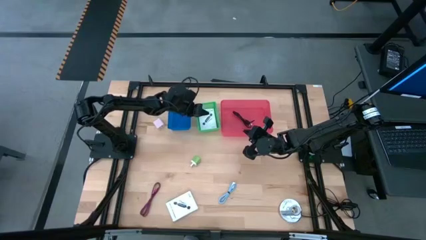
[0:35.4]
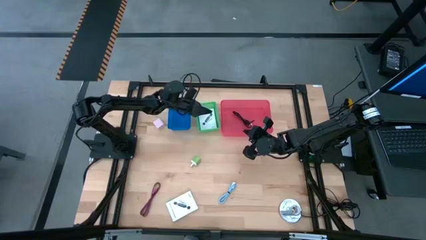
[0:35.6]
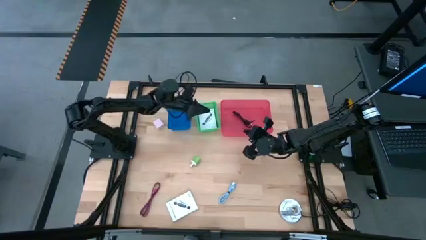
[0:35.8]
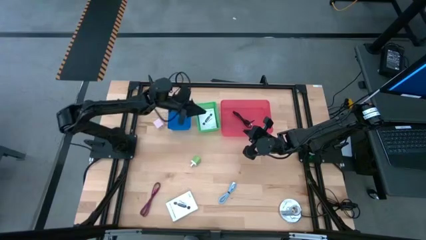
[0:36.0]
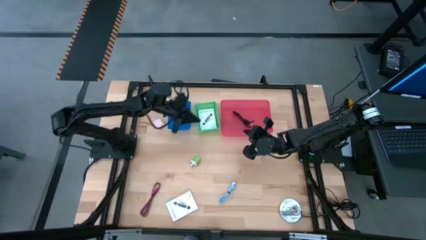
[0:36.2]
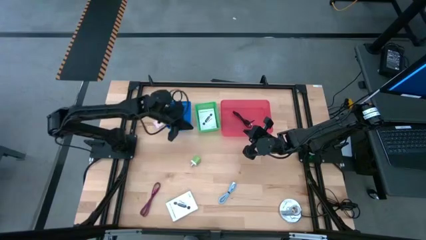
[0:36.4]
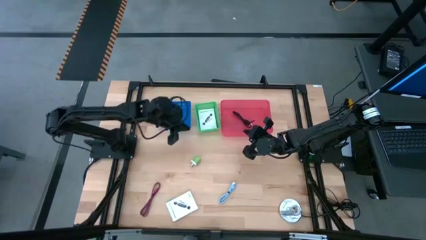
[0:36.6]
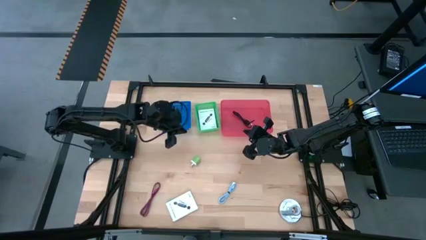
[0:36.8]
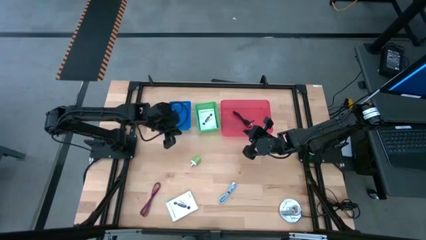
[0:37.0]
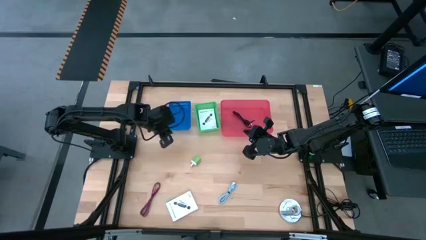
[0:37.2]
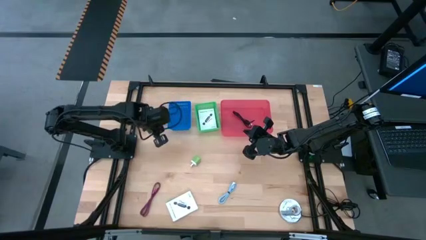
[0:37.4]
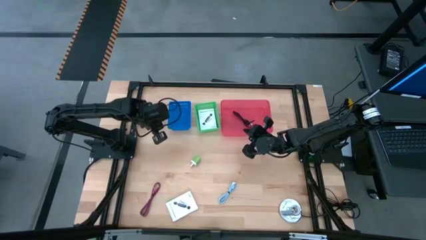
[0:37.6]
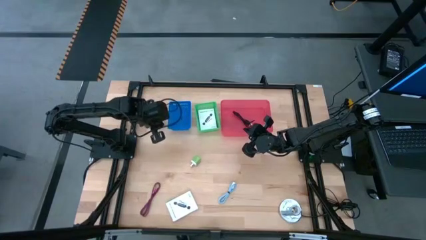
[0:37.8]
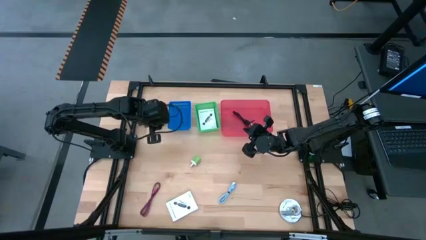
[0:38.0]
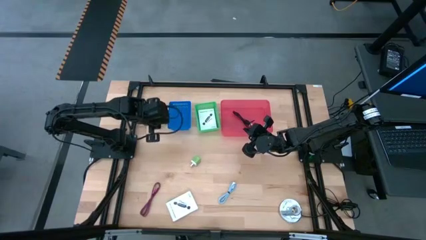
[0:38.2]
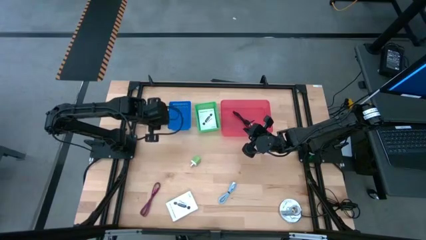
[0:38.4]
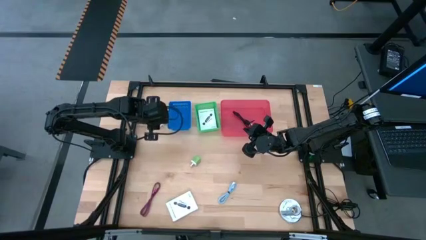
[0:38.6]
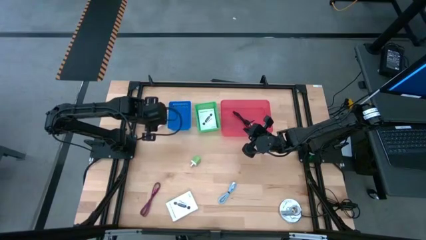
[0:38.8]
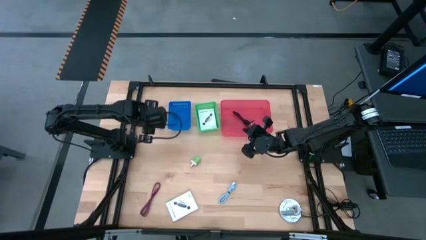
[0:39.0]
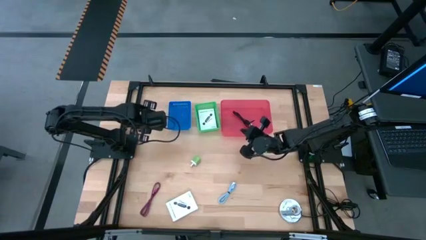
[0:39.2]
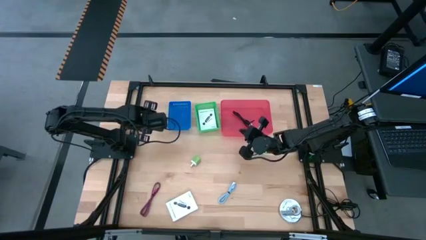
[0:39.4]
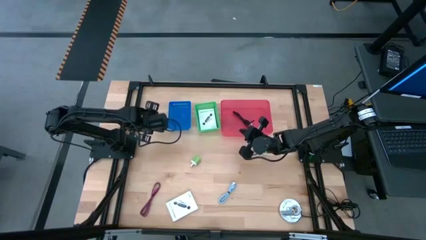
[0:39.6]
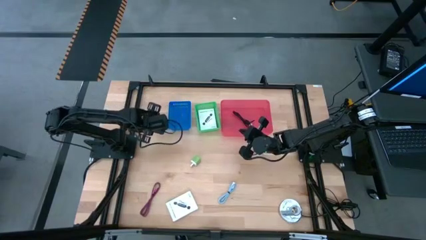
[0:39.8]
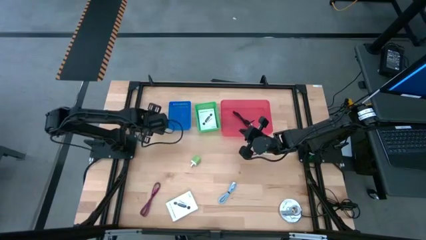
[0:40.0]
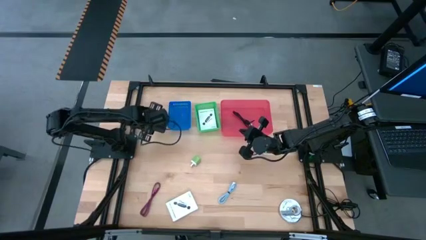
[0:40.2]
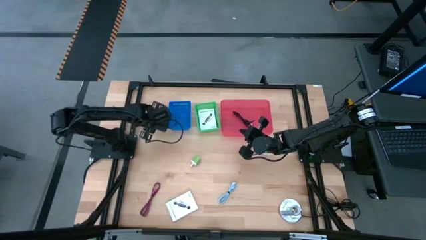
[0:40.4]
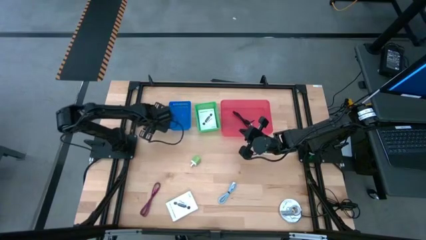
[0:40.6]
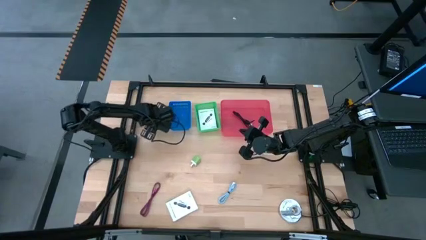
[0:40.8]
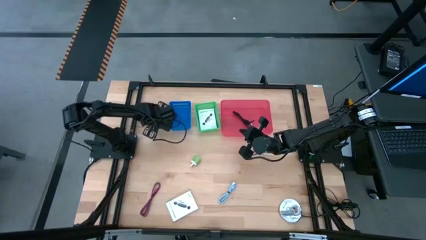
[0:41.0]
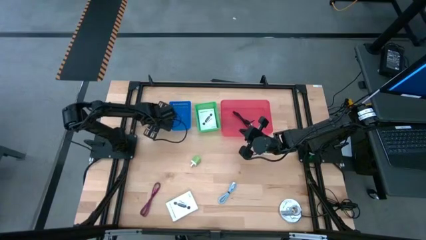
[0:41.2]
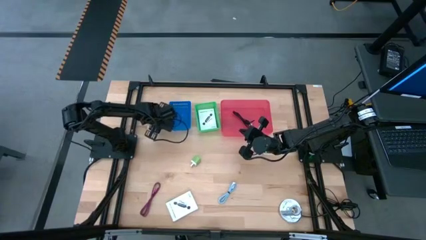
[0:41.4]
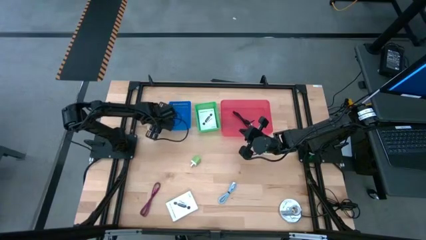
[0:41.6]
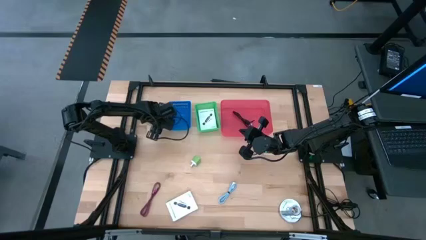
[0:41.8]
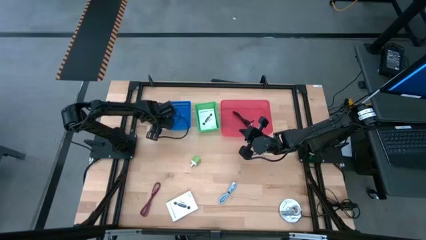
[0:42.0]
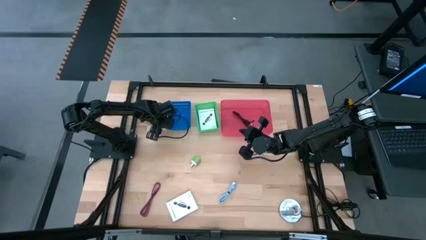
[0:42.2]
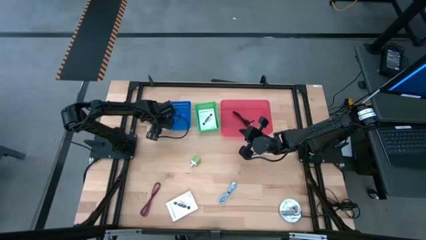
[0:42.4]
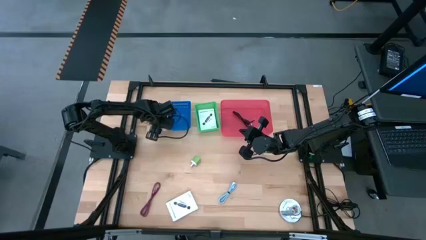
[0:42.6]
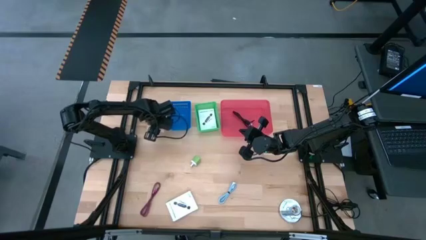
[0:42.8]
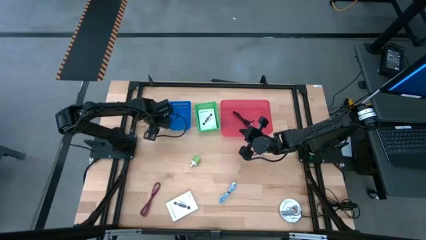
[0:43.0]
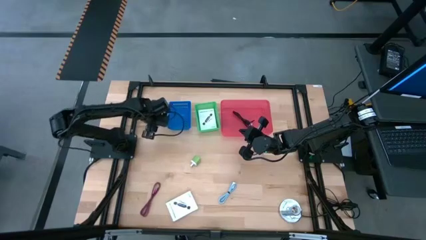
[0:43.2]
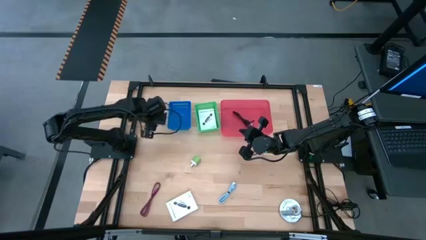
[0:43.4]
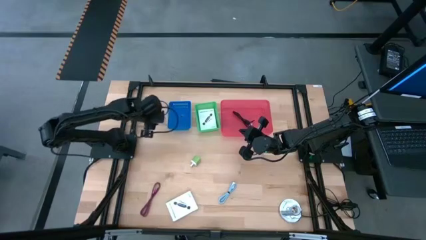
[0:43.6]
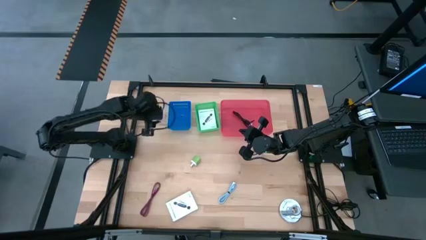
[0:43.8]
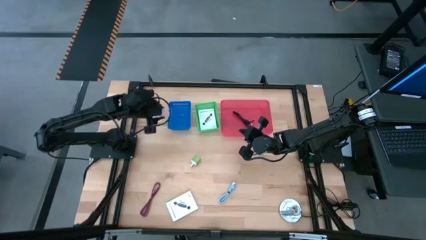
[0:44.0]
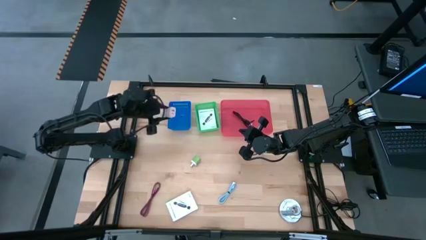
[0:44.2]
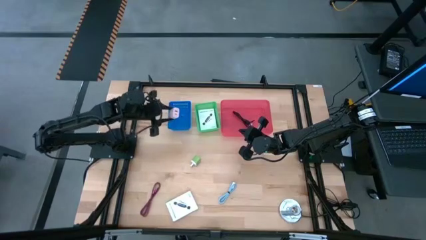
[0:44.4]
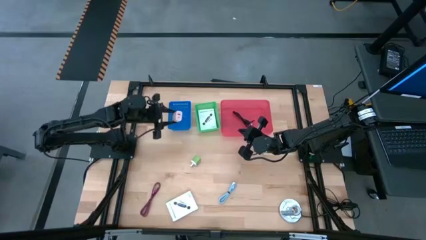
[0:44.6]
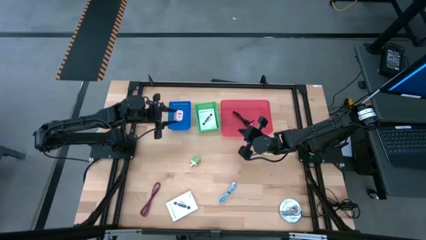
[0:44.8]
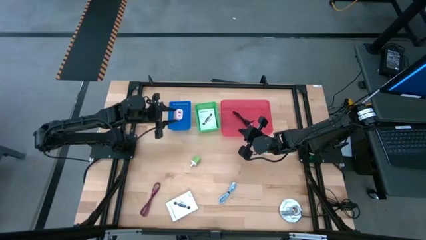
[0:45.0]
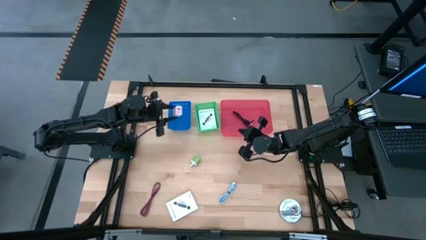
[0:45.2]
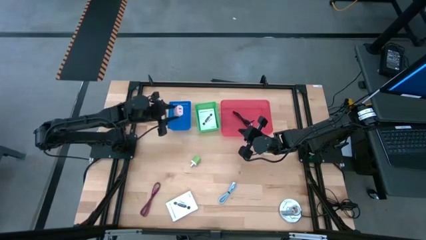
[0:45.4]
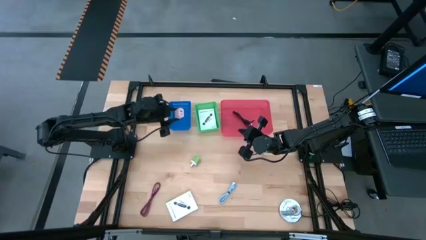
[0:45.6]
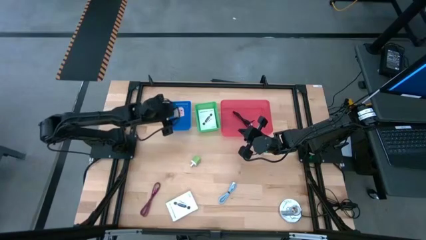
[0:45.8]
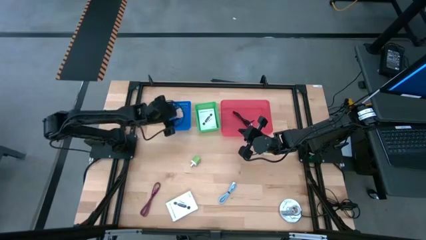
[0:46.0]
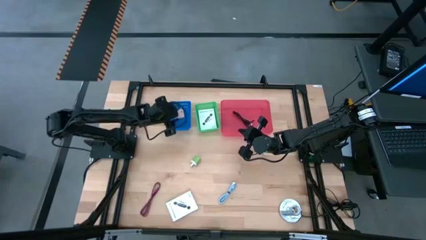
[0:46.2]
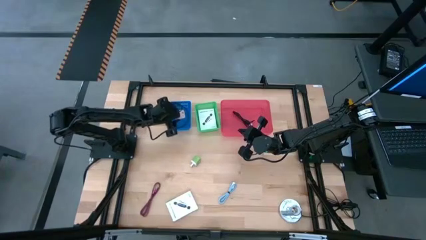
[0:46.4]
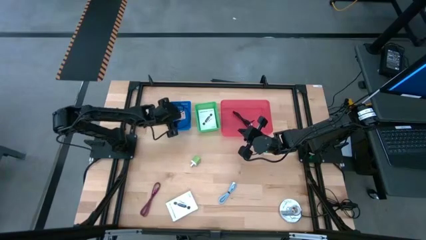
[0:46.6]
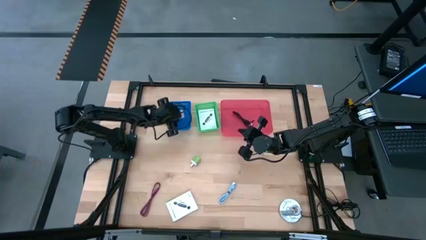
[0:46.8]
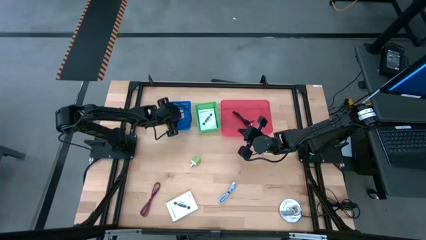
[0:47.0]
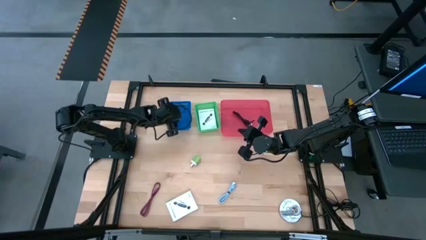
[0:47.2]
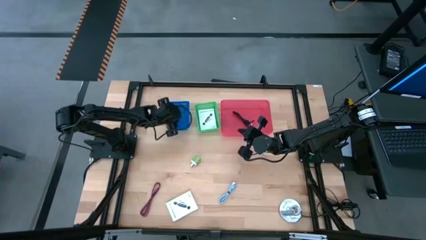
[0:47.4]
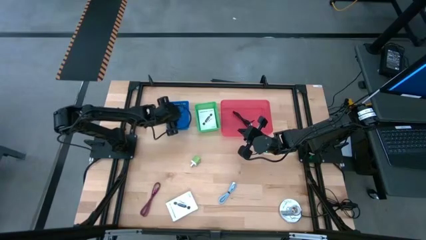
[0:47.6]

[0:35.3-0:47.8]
Task: Pick and place items into bin
Put the white charger adapter into the blue bin

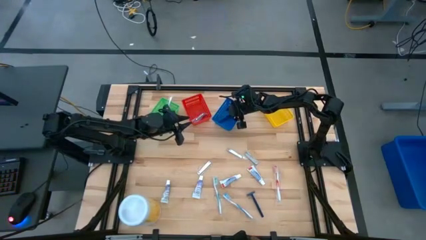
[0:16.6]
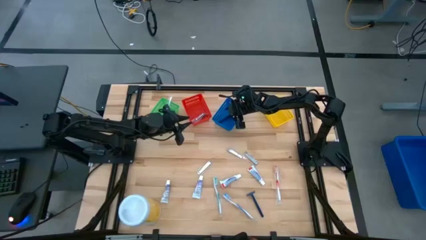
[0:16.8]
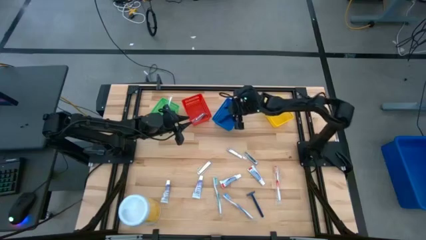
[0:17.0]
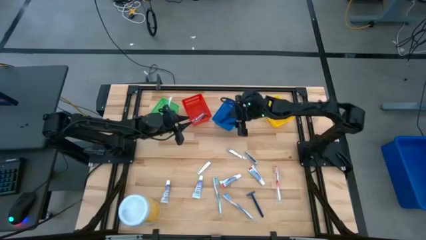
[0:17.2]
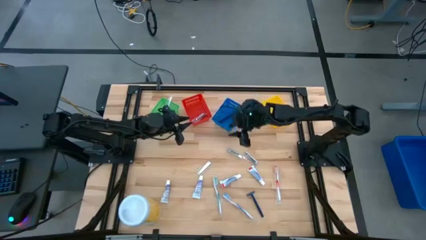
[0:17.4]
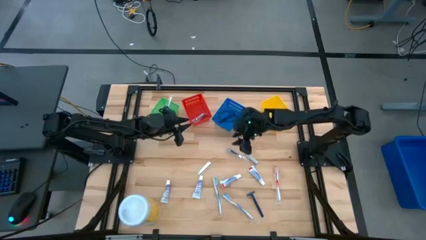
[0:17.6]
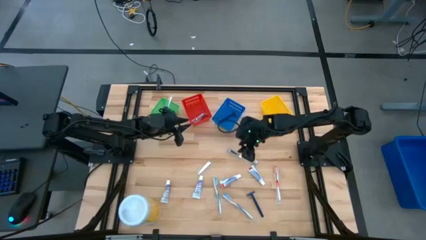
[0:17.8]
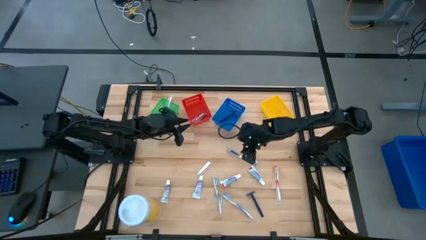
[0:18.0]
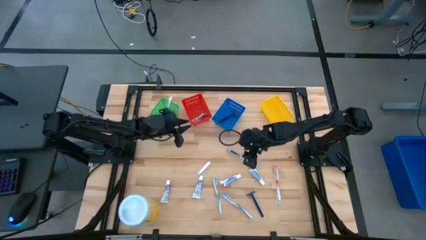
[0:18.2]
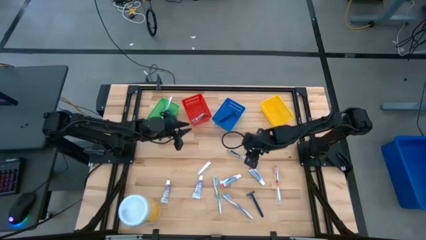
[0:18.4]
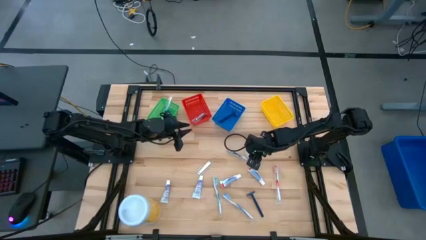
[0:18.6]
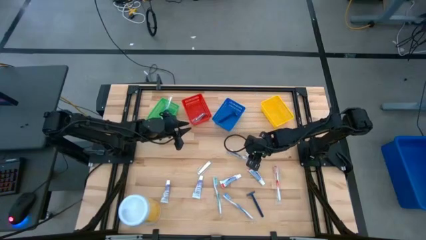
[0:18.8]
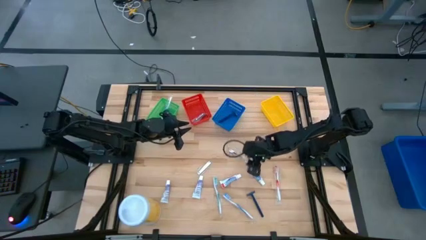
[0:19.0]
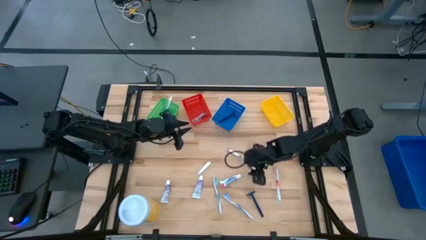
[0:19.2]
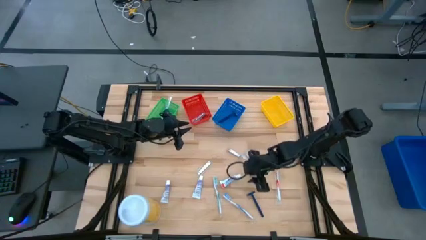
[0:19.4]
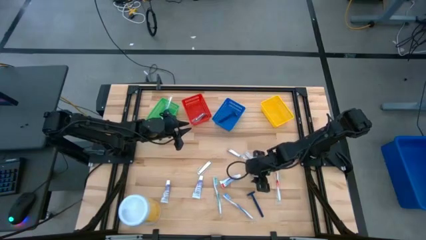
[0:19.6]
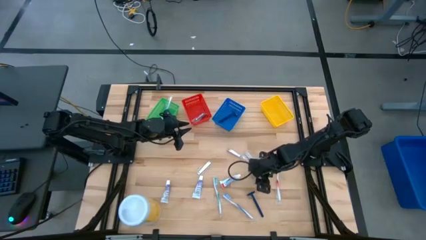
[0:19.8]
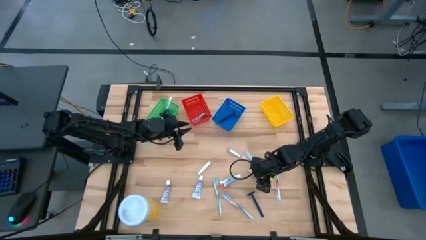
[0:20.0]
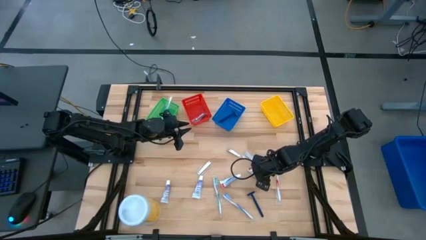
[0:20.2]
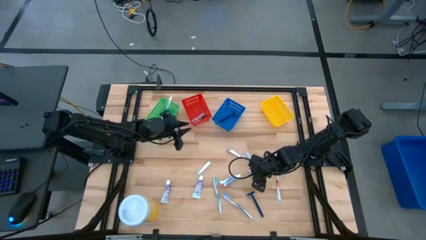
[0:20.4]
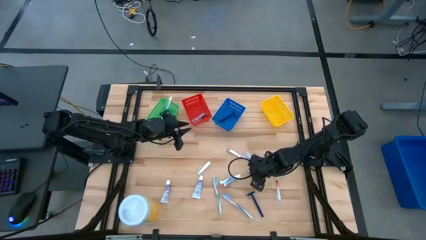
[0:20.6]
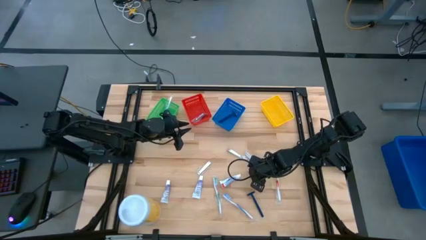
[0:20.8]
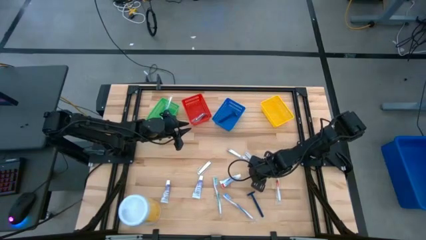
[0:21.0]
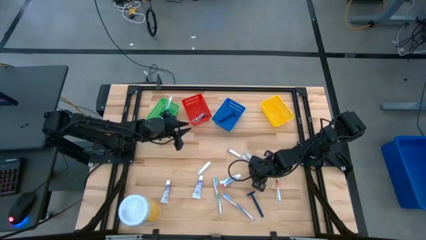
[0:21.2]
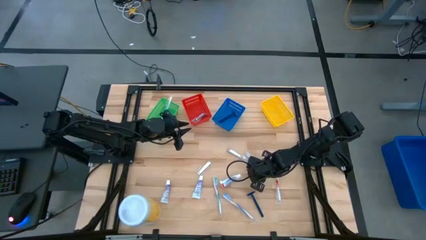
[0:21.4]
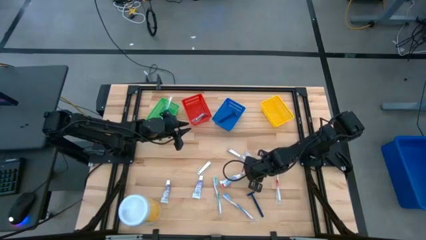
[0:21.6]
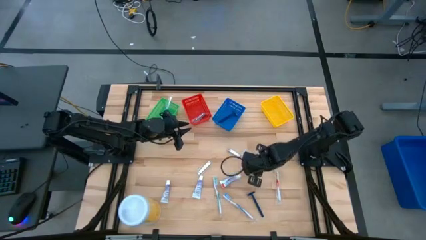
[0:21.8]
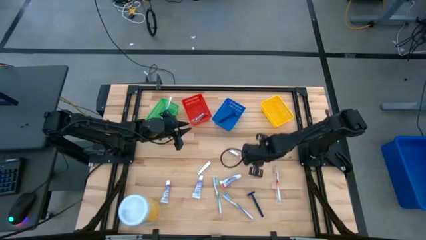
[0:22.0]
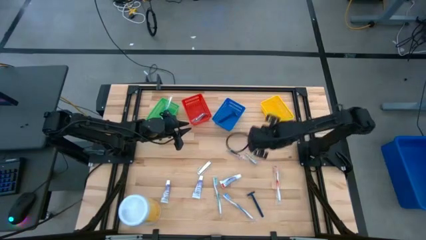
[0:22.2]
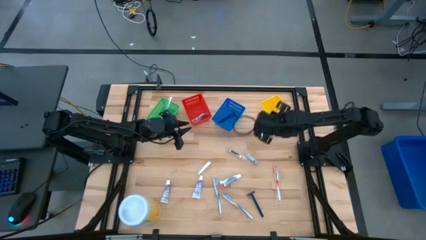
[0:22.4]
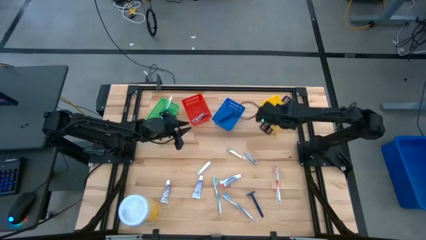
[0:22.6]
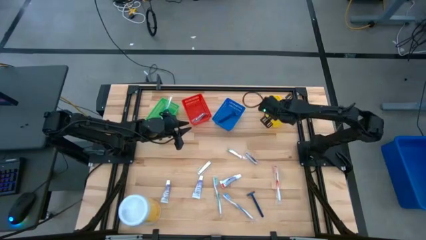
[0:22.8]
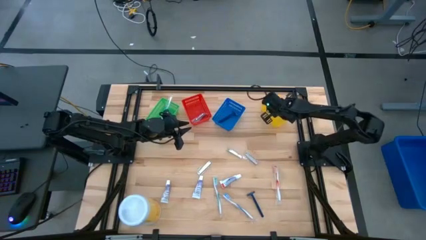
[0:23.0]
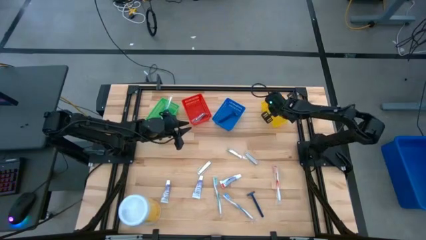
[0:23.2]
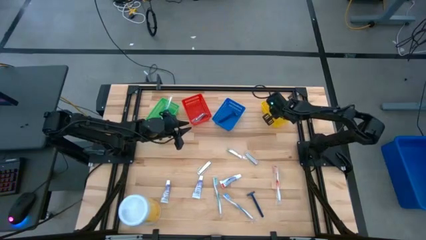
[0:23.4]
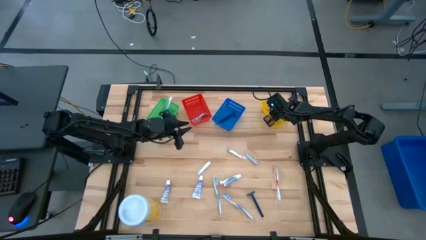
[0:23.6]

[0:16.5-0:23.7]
Task: Pick & Place Travel size toiletries
Put the toothpaste into the yellow basket
